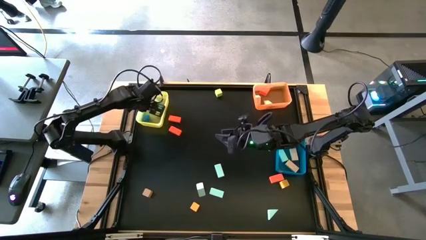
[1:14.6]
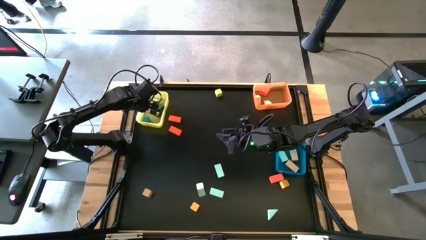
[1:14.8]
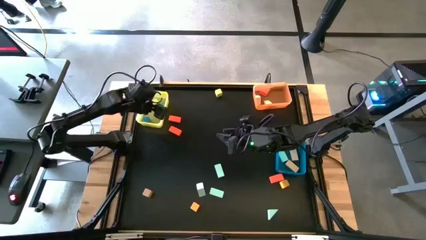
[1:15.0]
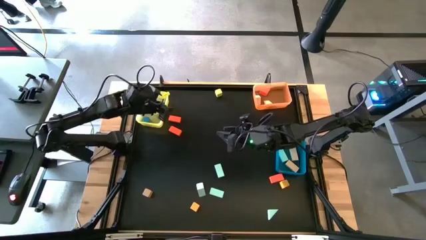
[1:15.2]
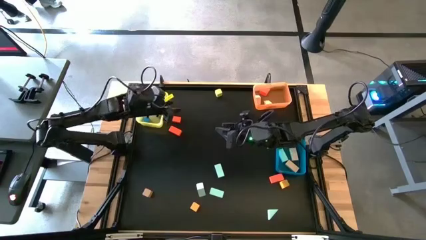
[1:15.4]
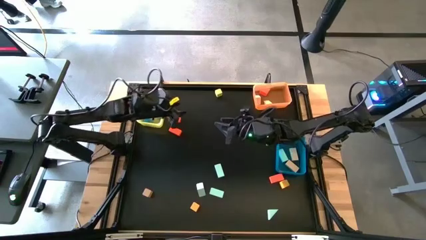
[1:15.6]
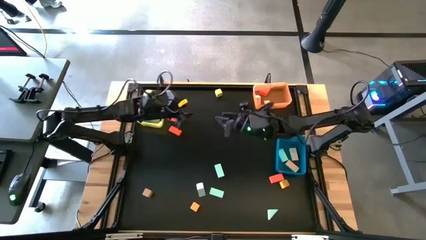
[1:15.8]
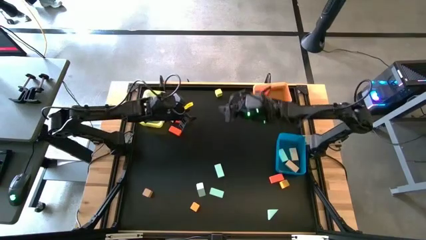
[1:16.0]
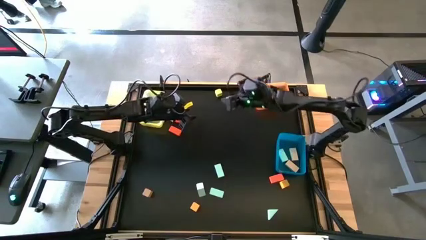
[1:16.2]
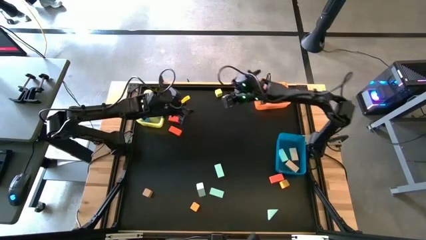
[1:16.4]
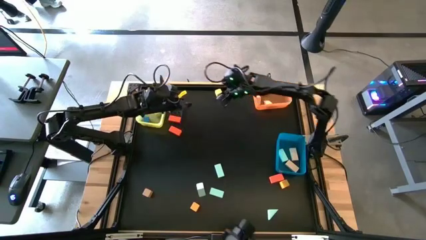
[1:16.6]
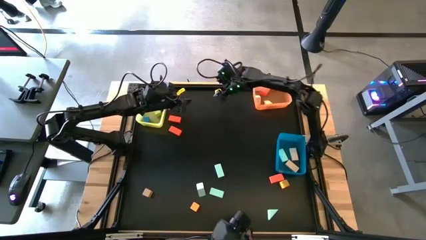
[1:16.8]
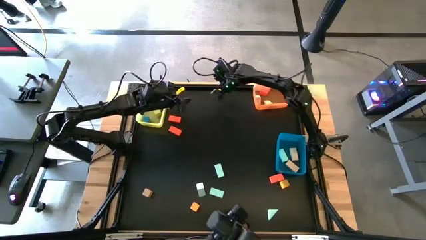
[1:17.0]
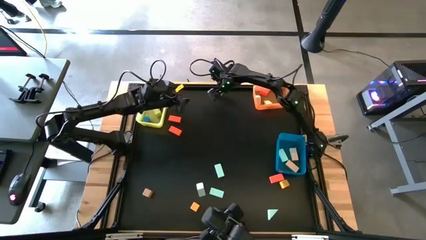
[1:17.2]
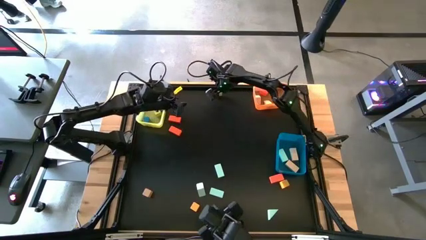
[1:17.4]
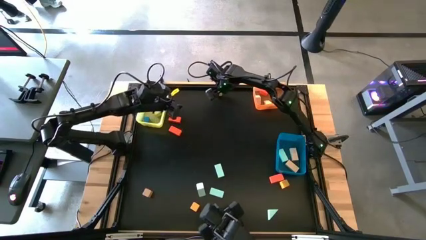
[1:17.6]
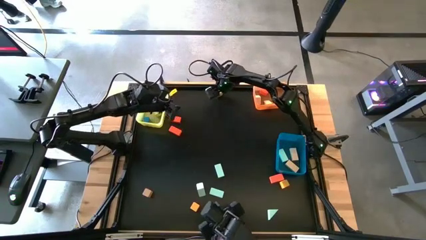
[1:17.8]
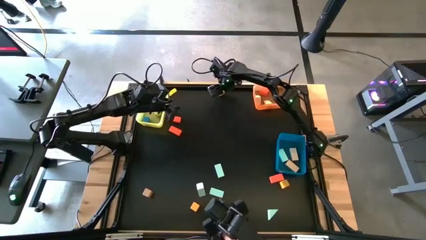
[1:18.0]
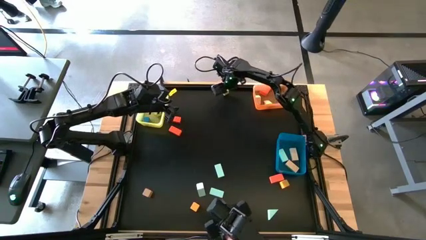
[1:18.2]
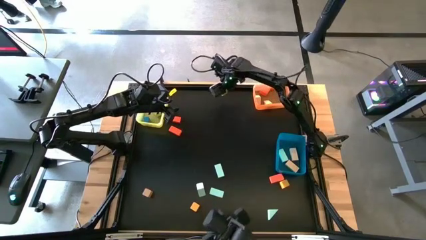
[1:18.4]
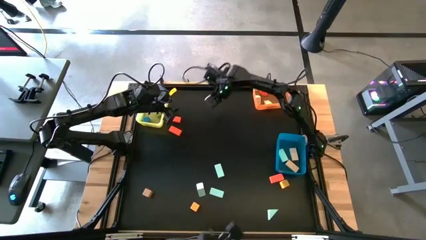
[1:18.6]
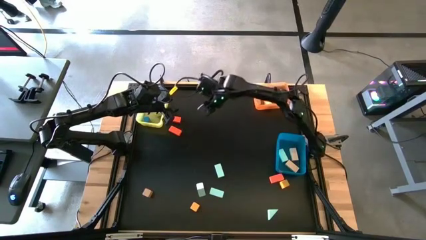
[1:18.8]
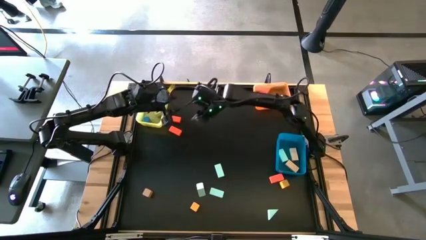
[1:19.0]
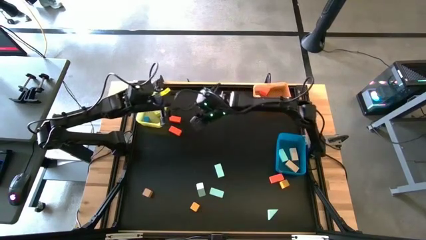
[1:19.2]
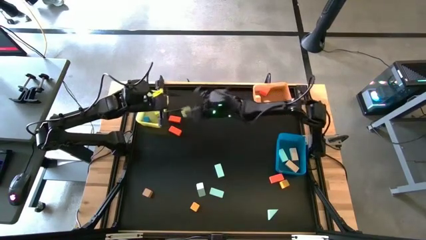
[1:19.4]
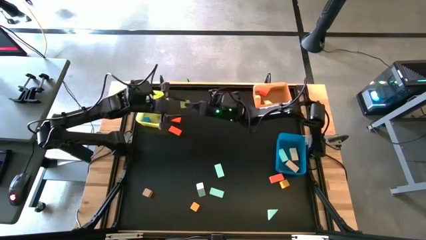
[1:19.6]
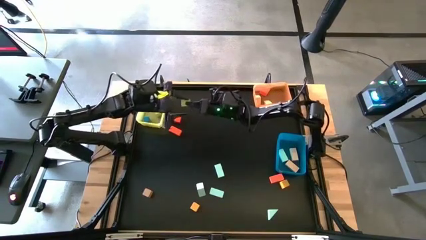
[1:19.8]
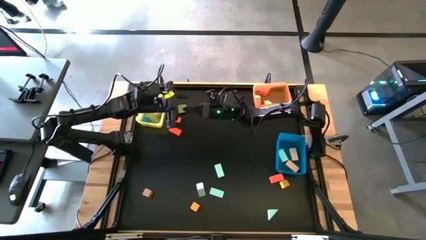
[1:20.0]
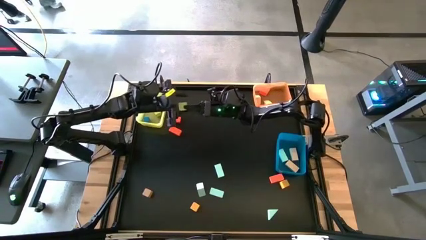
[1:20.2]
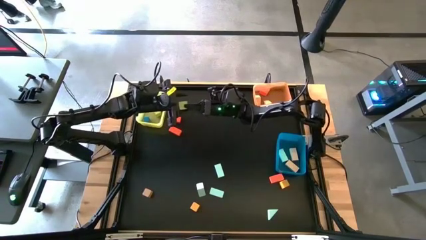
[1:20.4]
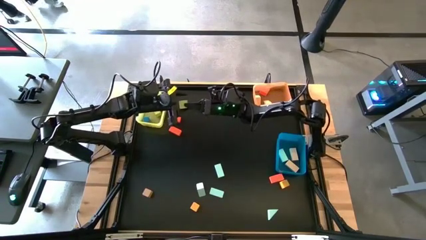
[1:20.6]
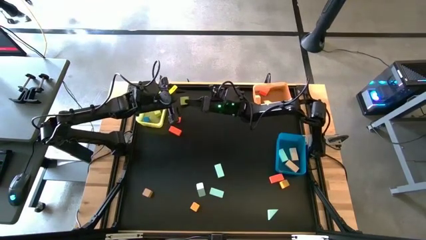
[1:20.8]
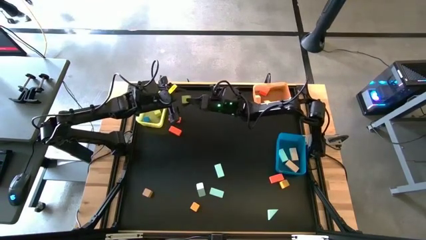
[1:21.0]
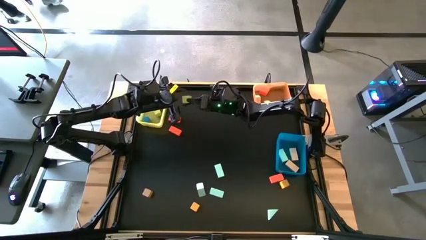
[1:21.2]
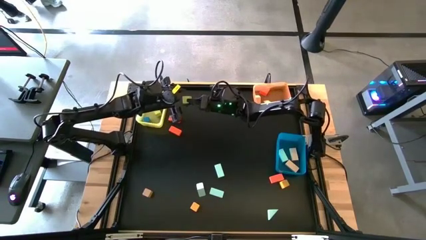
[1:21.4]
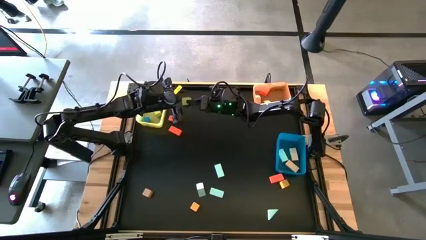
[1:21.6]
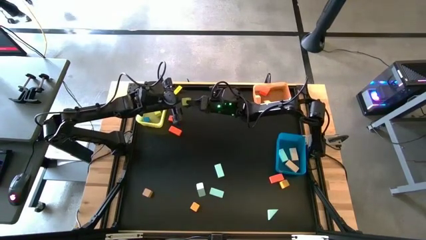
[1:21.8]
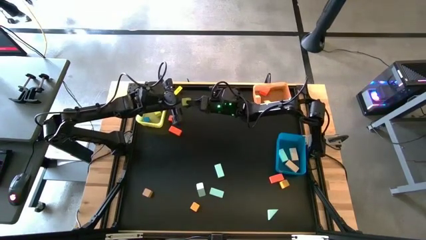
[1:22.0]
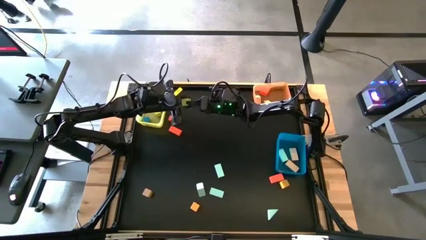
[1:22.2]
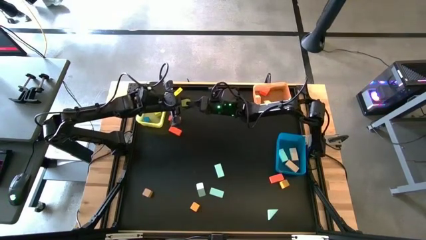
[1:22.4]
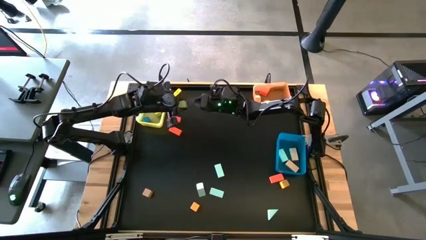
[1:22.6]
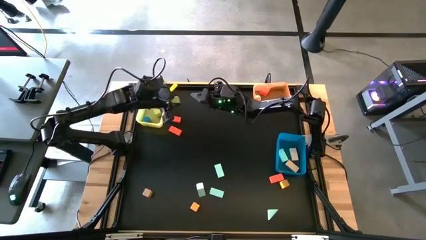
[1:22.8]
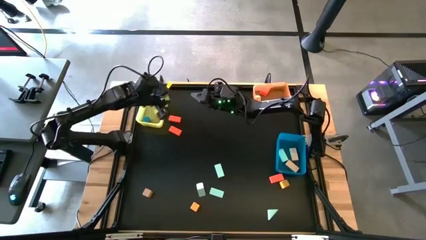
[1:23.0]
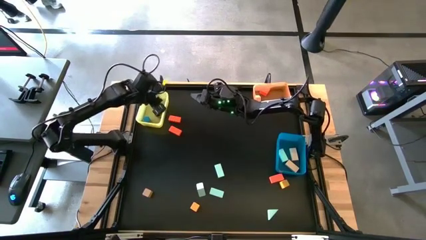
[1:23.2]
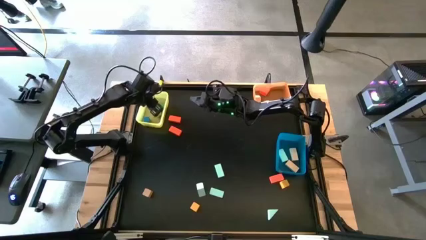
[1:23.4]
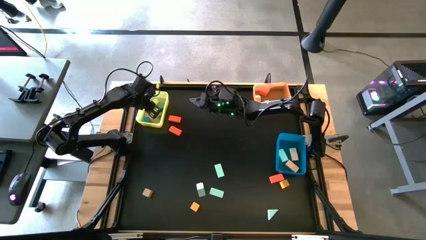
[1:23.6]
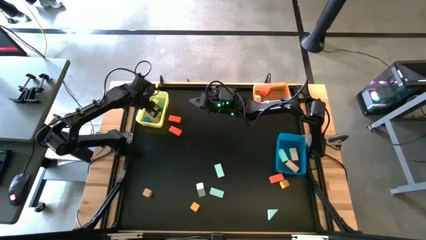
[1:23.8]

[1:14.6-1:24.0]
Task: Sort blocks by size
Put the yellow square block into the yellow bin

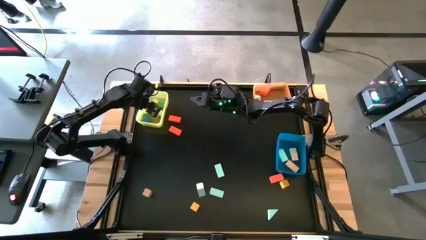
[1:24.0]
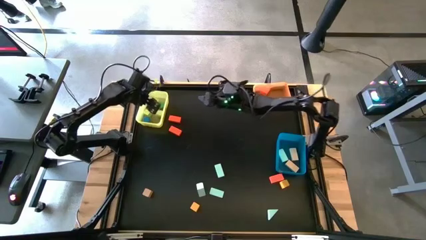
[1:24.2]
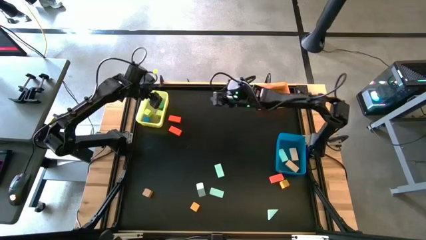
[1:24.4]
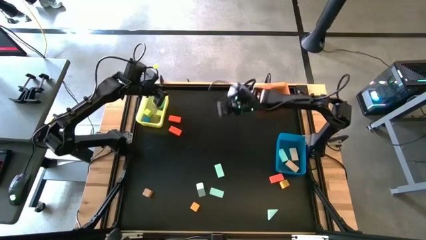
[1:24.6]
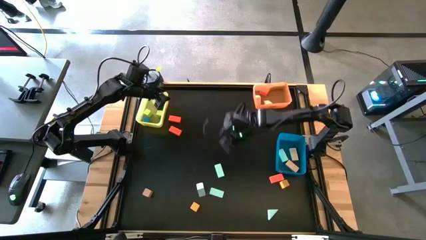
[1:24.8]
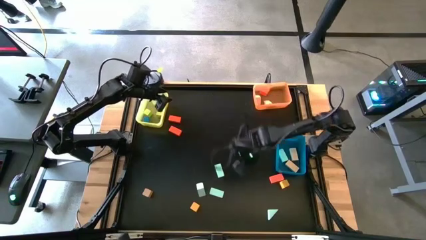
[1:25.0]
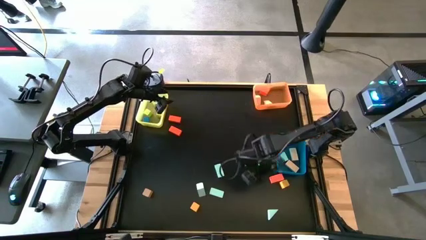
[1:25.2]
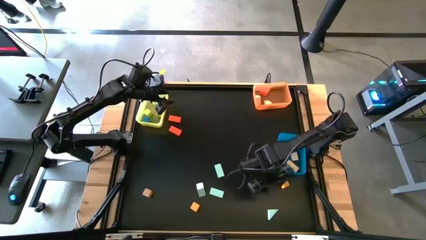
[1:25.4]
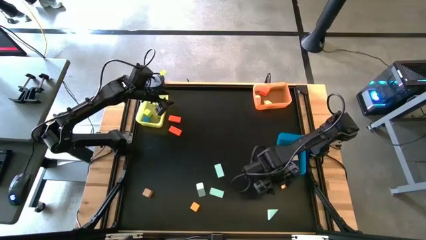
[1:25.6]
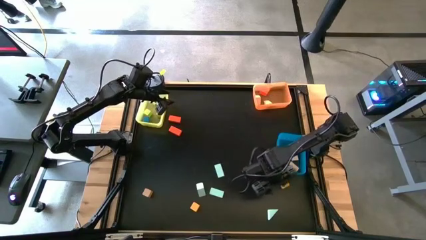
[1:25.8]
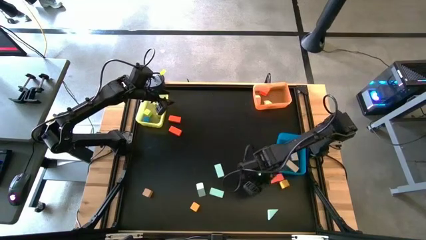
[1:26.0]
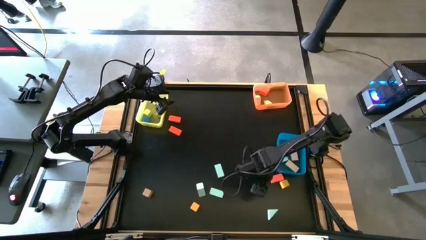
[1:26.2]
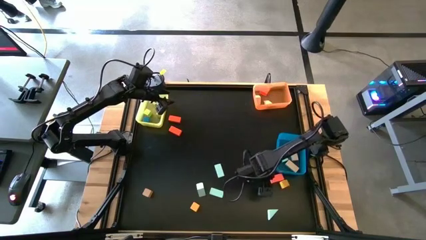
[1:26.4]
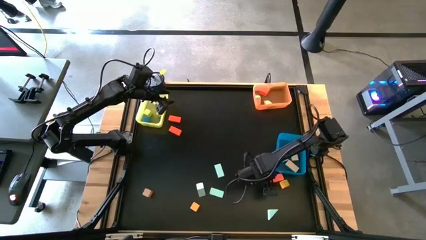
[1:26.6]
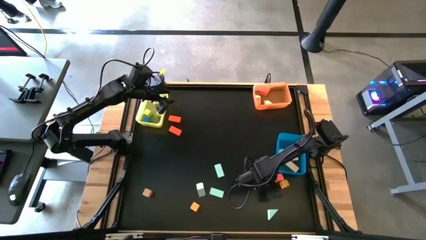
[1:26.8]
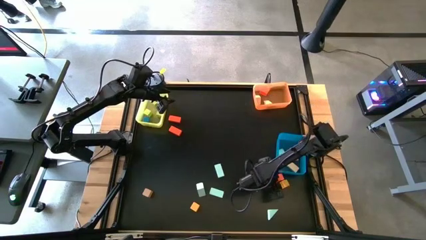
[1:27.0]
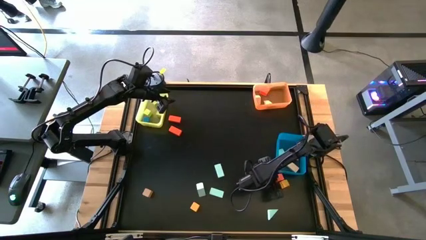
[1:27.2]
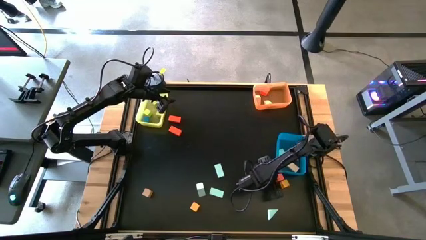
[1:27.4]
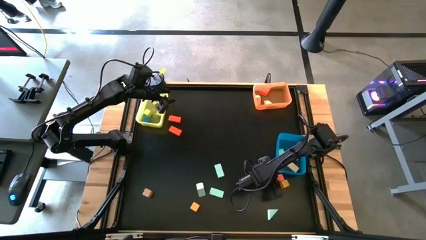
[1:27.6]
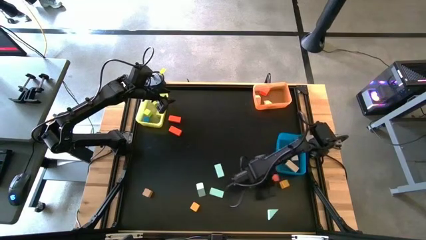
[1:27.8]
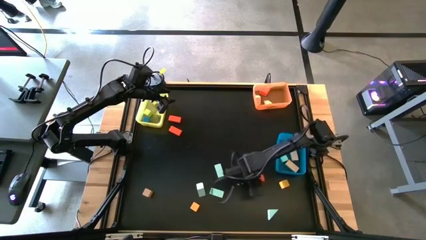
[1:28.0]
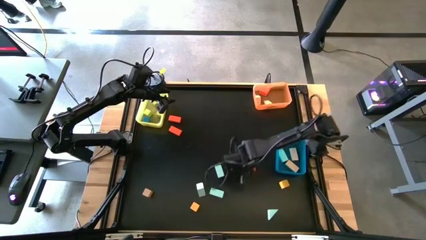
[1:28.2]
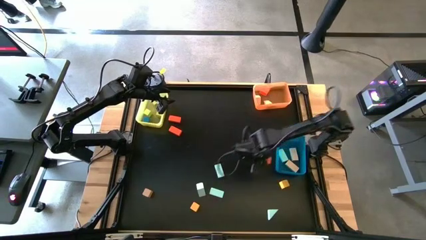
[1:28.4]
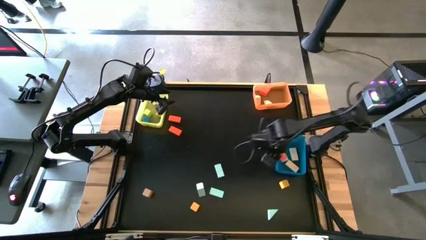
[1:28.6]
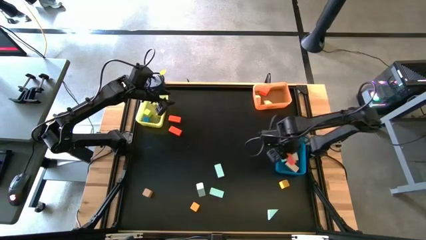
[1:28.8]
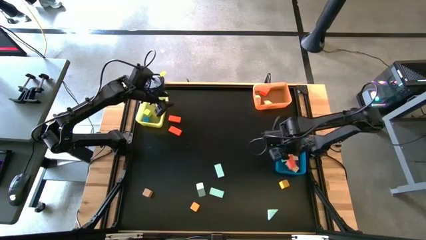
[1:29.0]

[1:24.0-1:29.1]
Put the orange rectangle block into the blue bin
